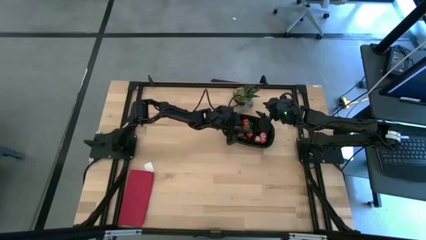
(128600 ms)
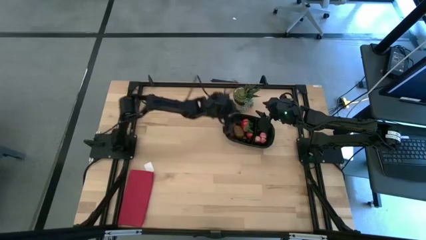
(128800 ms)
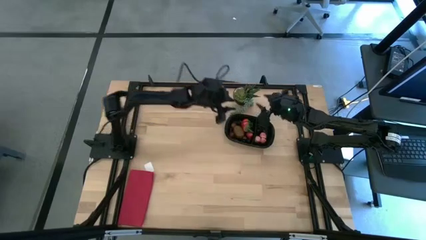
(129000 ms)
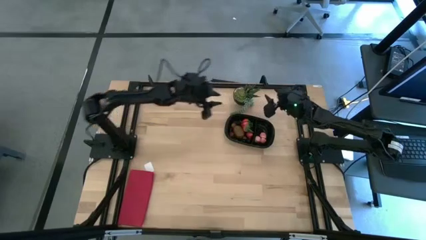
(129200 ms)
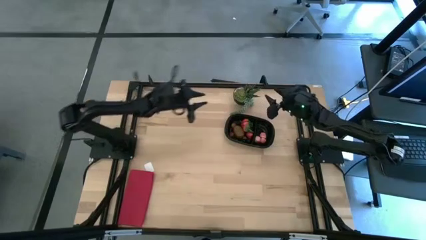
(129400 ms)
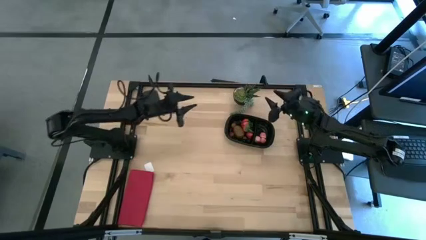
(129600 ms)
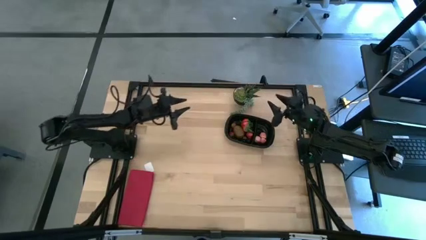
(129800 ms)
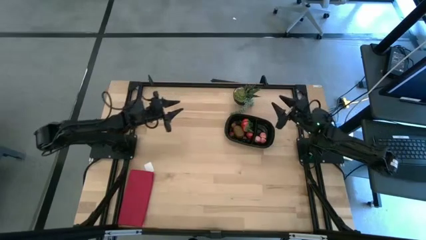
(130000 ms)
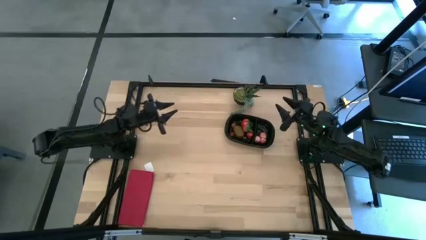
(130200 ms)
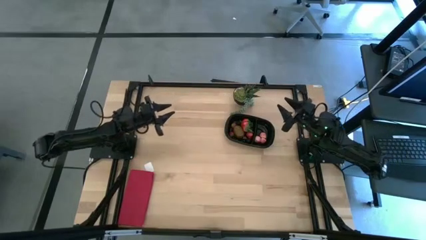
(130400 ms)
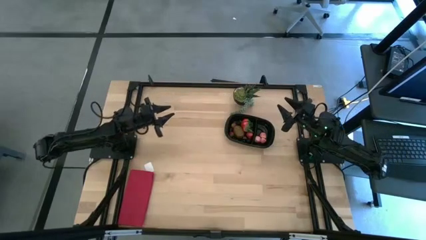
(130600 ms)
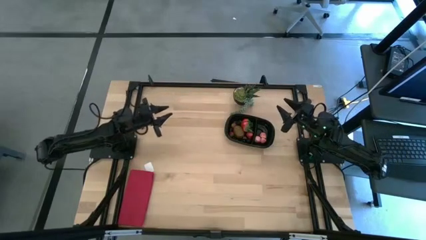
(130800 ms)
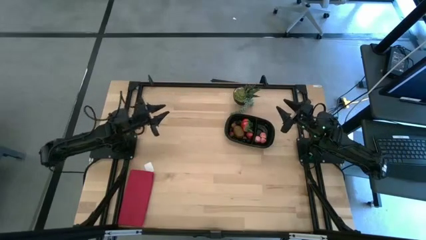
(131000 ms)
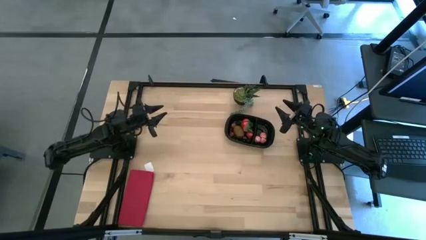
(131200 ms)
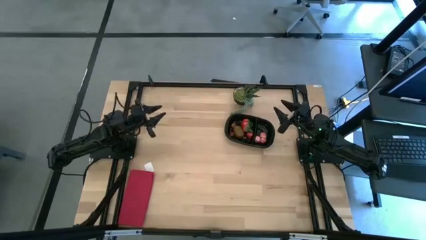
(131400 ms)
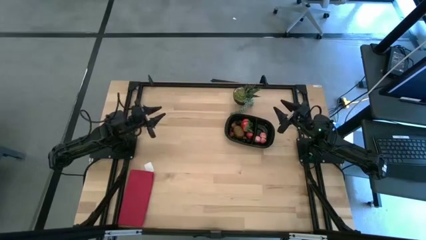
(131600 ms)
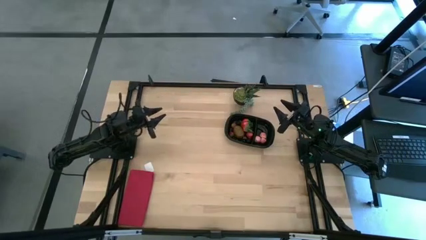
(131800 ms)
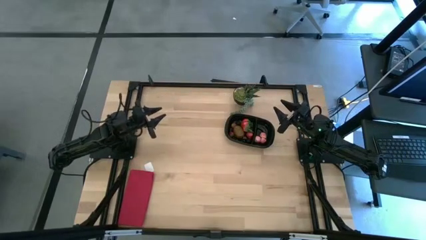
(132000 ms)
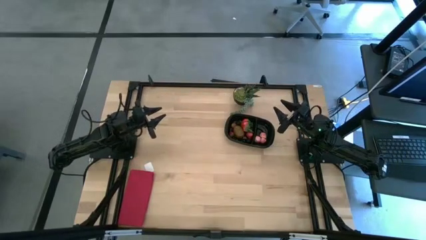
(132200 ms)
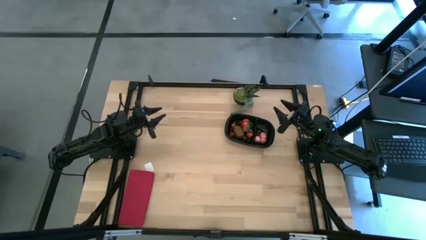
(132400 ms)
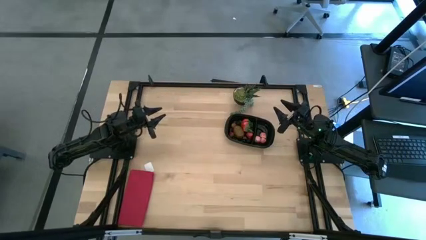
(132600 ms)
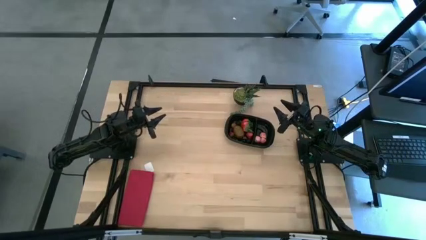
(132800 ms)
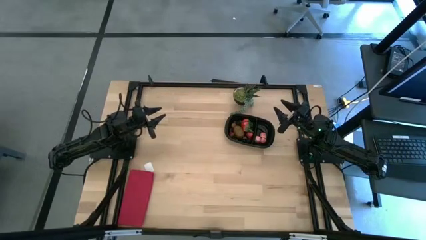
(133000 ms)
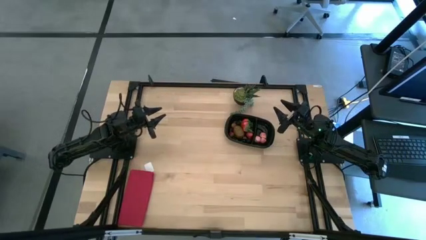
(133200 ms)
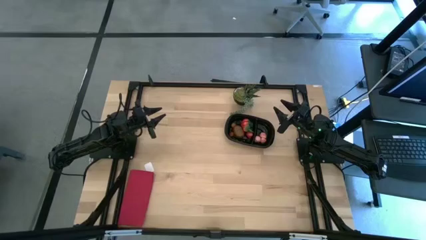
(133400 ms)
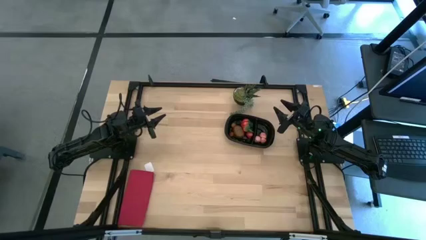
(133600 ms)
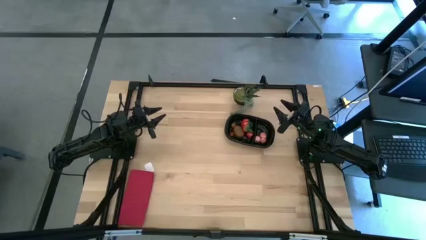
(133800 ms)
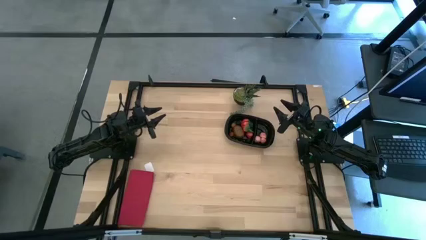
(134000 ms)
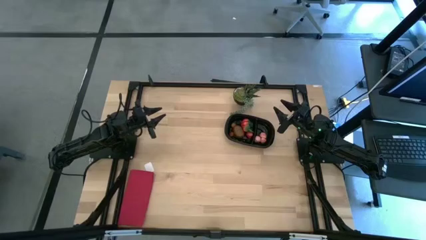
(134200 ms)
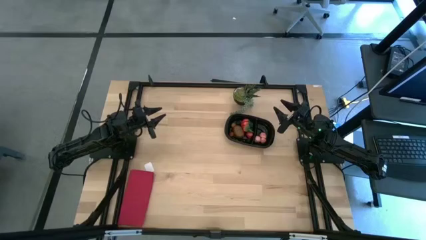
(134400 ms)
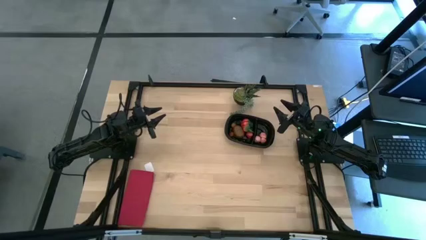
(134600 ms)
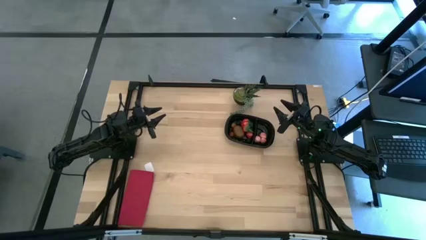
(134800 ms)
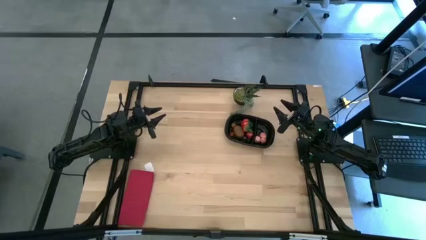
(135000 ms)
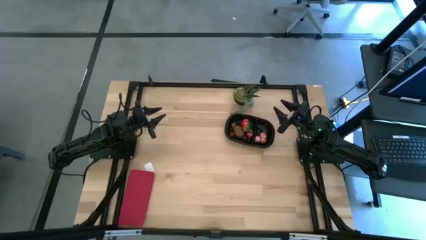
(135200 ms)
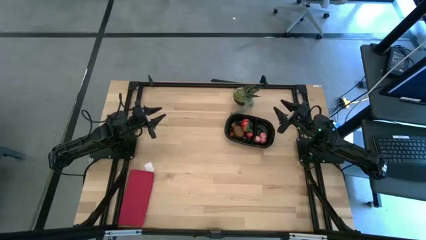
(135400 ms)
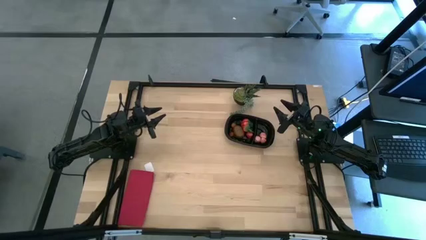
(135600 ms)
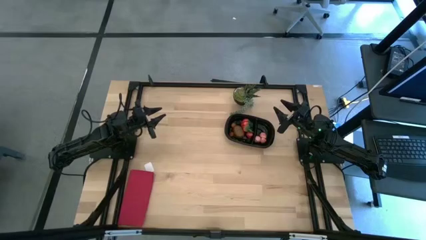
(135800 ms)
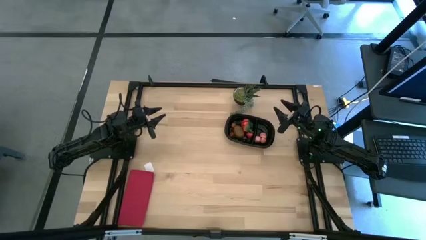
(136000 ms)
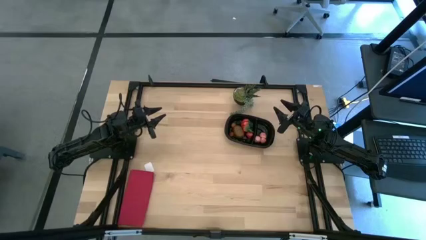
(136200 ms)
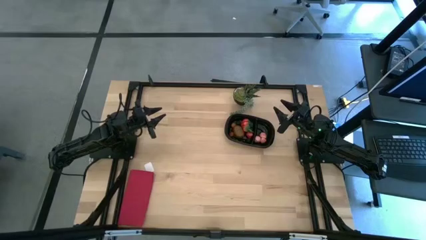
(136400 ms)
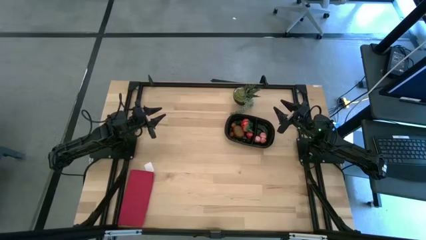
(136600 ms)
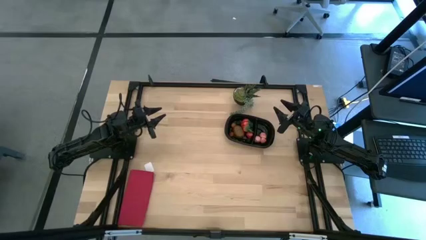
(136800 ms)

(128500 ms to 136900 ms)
Task: Pick and placing Produce into tupperware
Return to Home Position

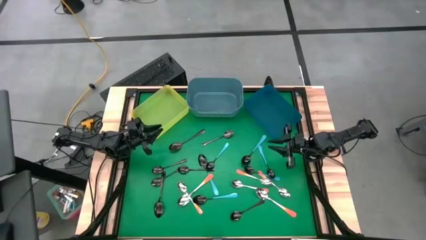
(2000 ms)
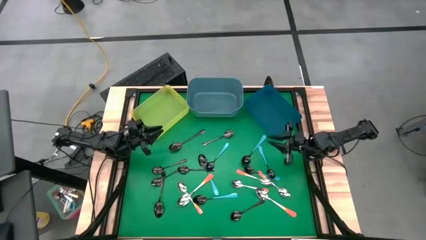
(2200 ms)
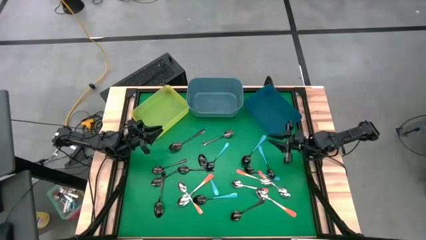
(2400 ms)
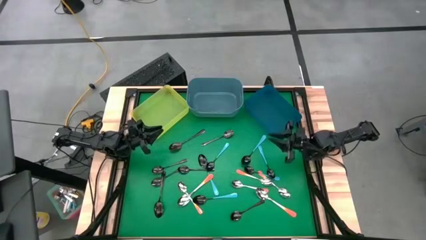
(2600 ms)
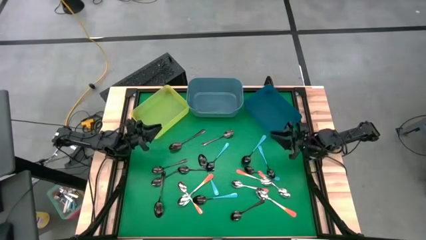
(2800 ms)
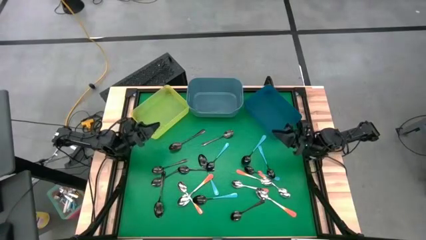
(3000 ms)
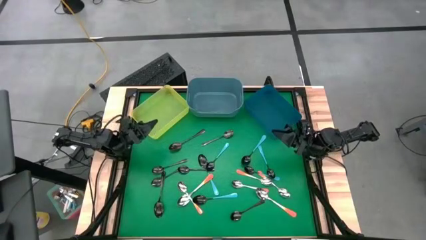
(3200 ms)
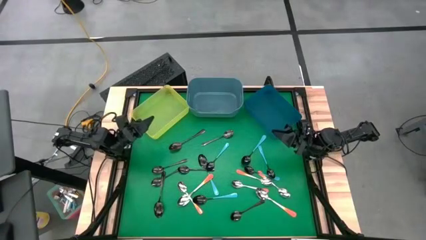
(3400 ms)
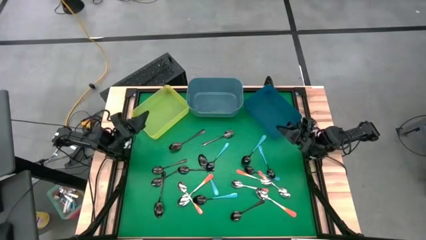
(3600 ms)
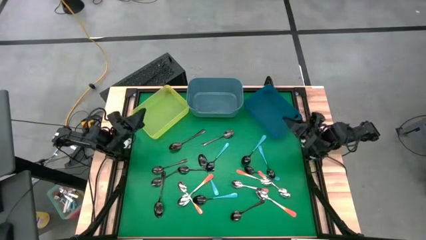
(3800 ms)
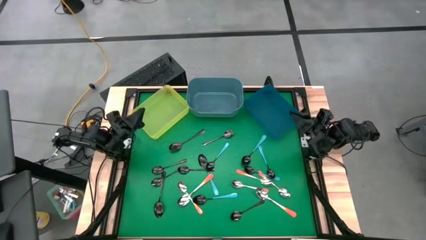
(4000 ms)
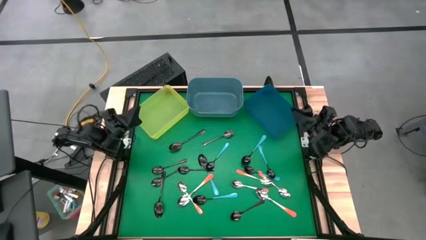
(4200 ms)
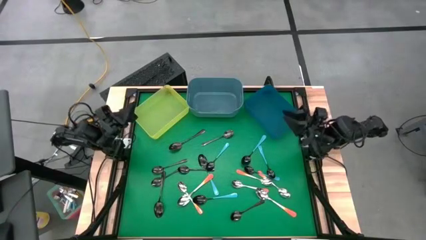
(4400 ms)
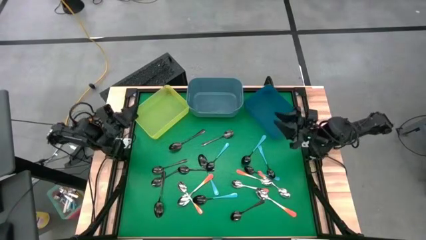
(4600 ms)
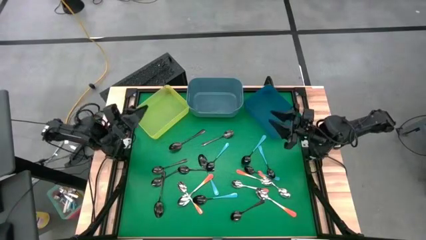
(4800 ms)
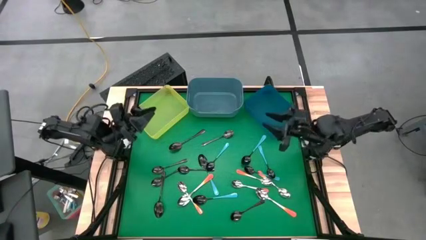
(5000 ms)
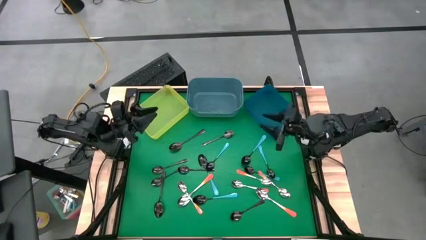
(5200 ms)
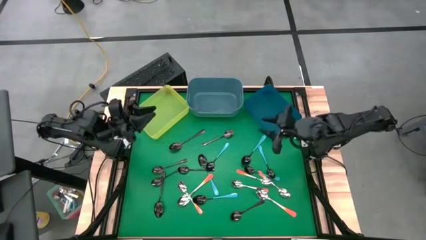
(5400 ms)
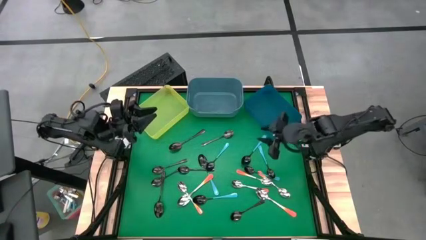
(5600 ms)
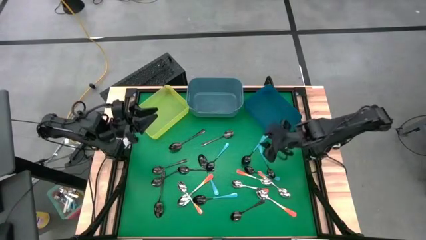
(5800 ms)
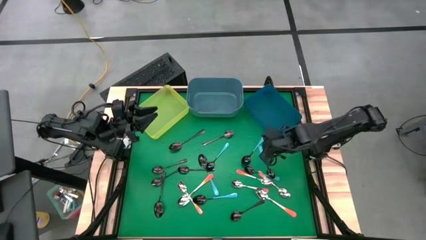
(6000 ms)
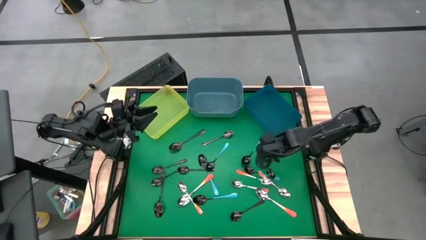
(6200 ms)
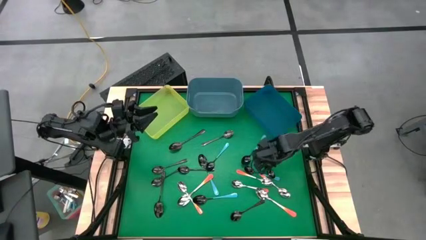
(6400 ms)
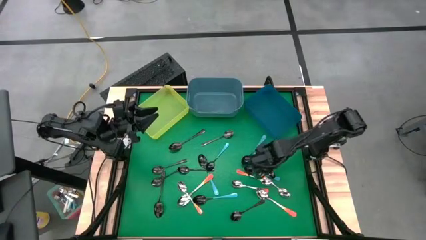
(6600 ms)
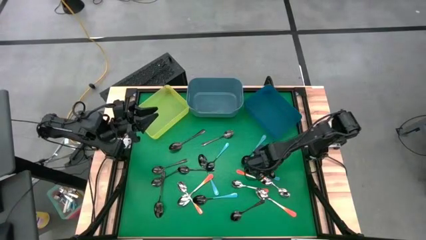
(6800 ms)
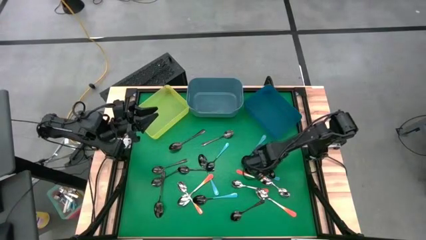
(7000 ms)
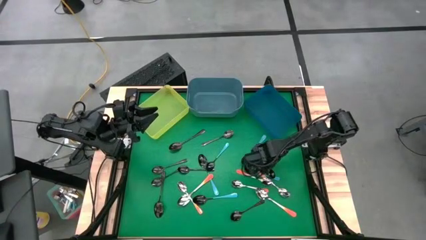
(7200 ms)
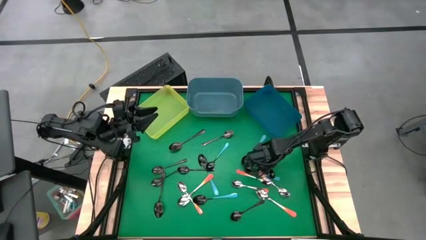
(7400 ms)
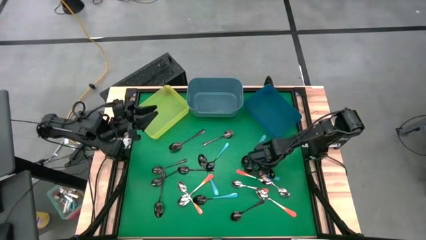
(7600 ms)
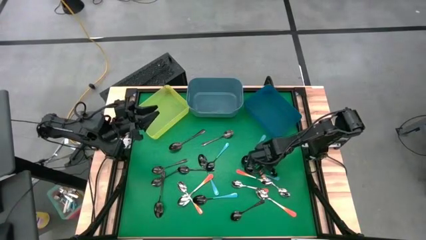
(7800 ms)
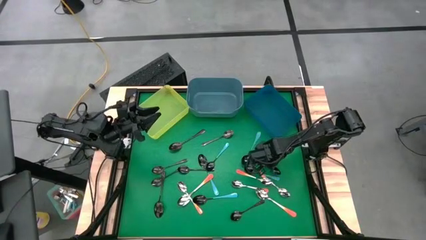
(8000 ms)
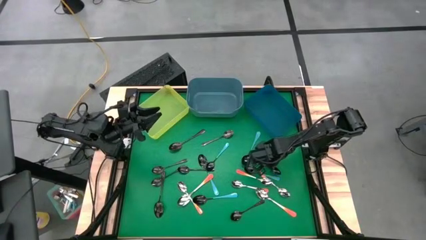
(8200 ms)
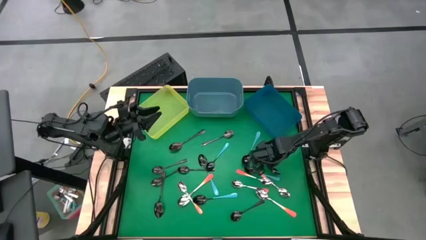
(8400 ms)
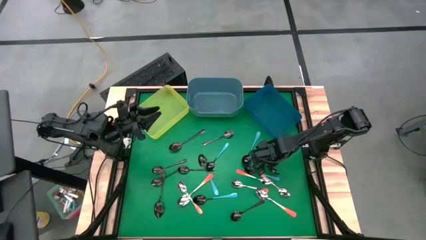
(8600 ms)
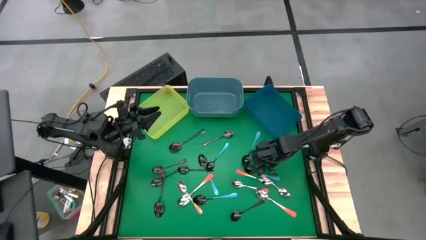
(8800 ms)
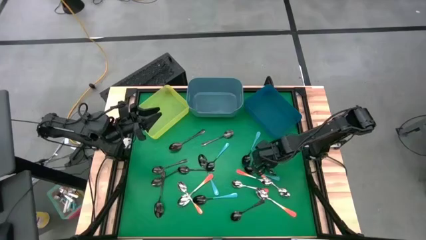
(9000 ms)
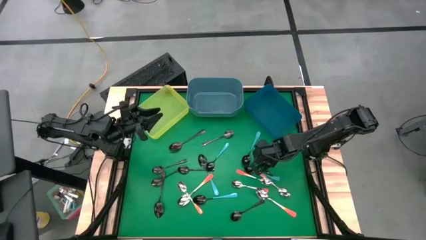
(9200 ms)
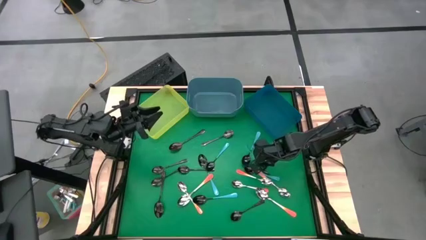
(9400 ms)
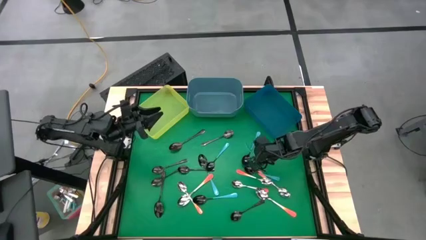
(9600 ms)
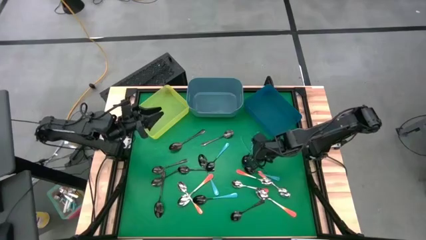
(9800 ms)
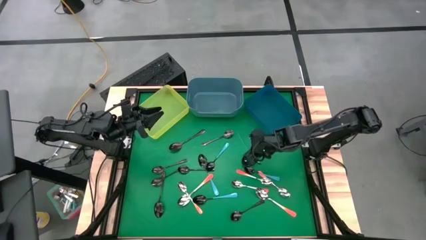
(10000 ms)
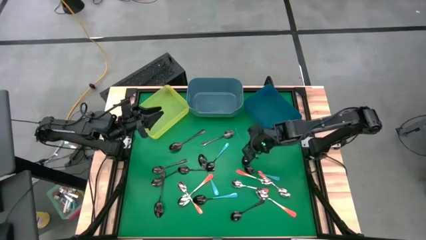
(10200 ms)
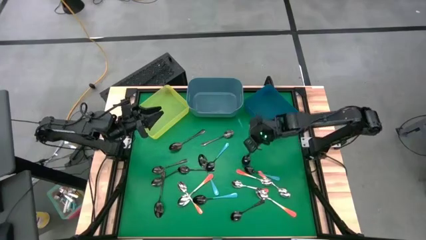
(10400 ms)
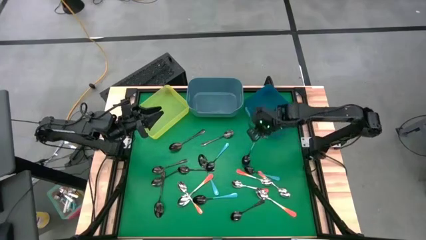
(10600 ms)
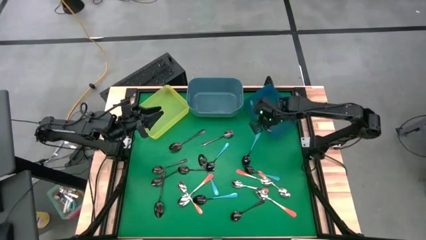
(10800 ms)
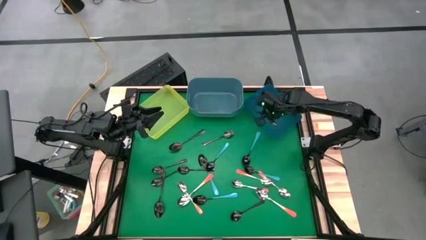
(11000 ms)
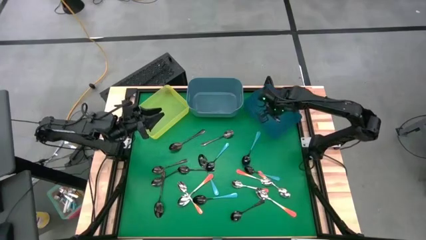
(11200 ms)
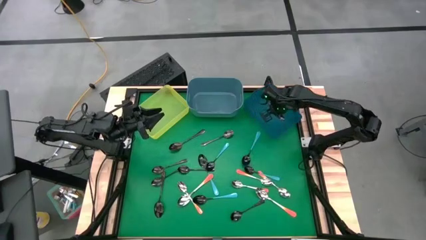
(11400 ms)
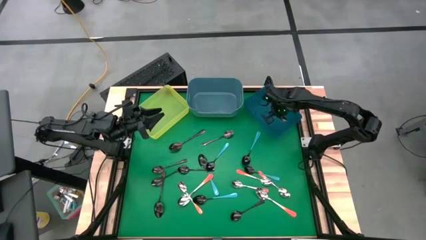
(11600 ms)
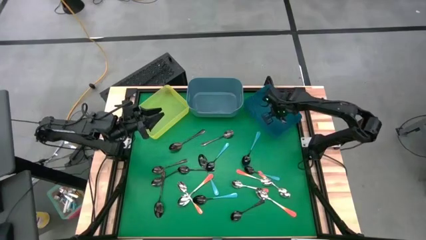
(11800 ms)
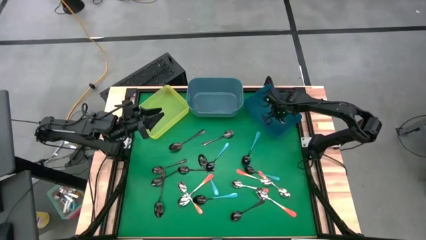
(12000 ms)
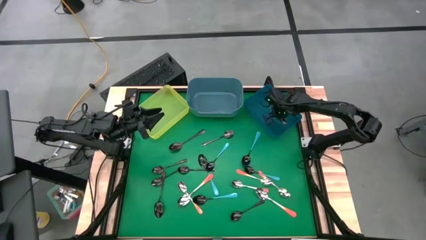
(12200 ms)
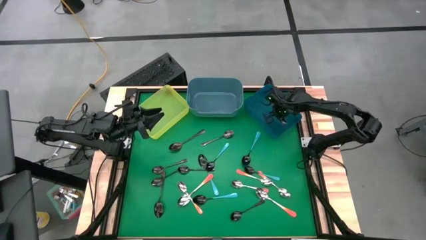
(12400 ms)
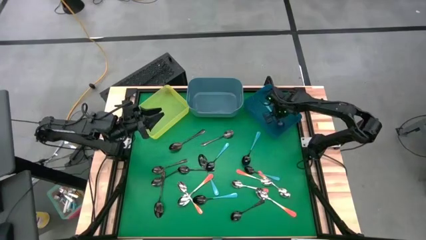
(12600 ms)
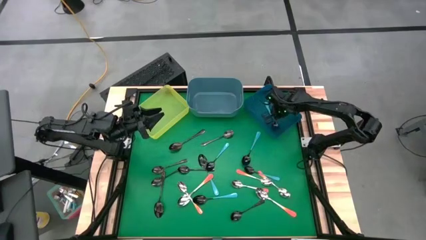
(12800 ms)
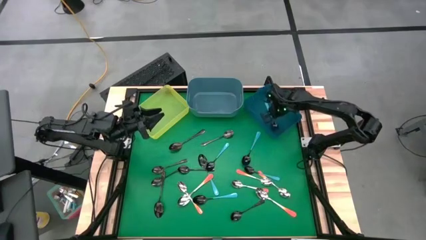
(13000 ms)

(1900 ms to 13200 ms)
Task: Sort silverware by color (type)
Put the blue spoon into the blue bin
